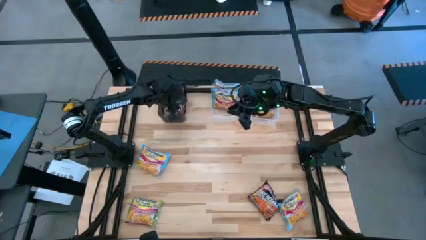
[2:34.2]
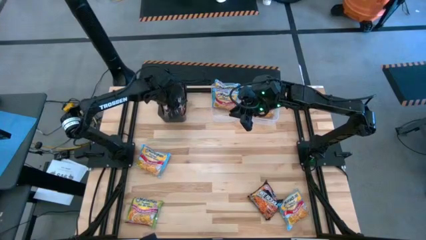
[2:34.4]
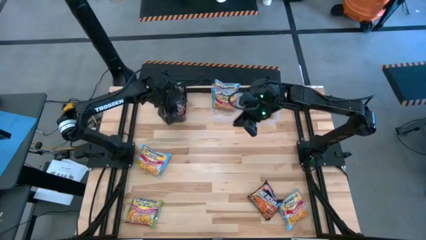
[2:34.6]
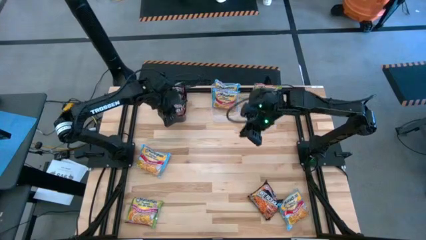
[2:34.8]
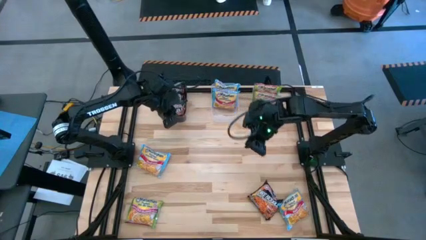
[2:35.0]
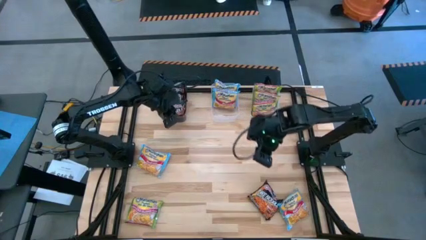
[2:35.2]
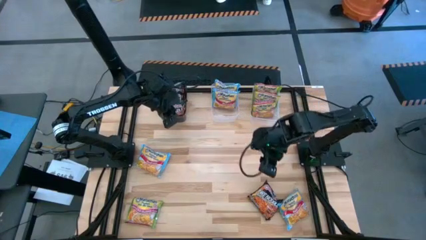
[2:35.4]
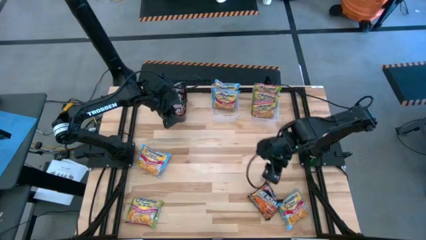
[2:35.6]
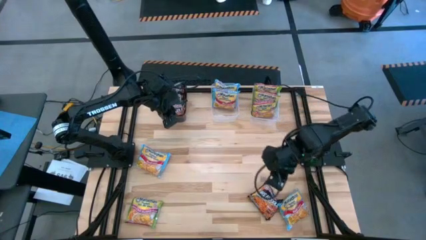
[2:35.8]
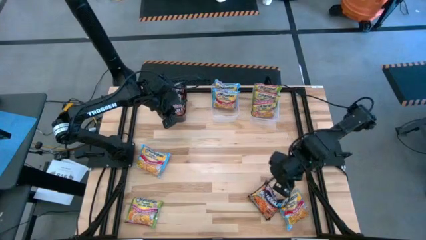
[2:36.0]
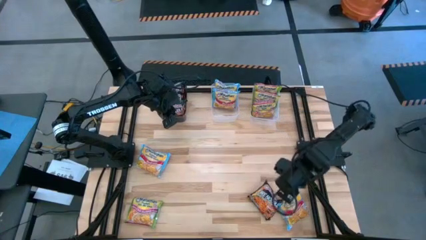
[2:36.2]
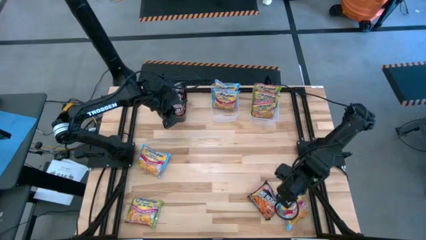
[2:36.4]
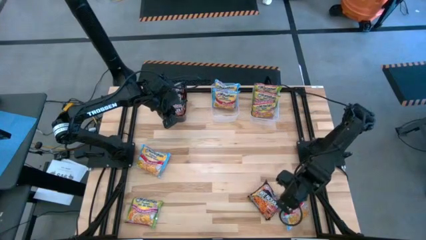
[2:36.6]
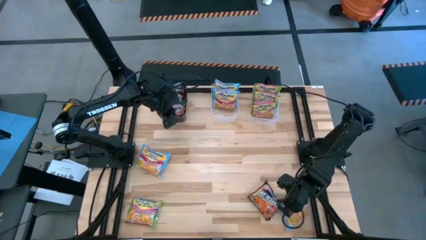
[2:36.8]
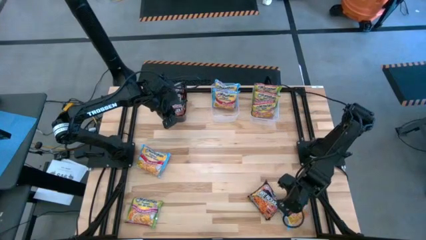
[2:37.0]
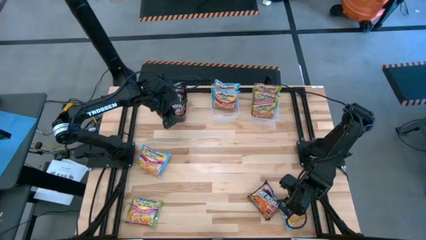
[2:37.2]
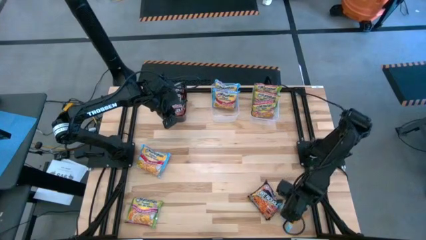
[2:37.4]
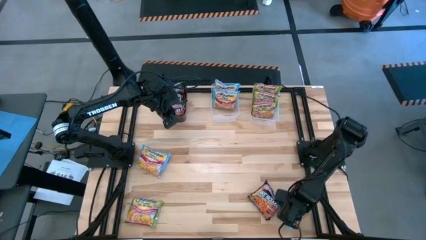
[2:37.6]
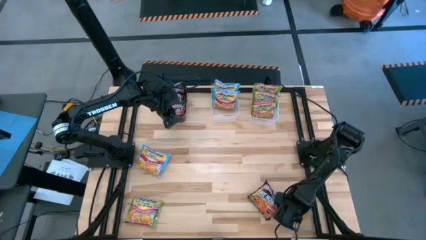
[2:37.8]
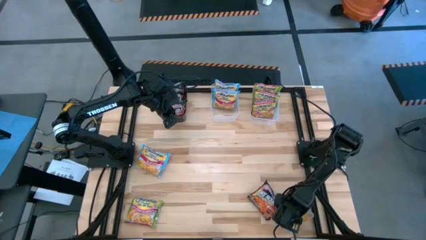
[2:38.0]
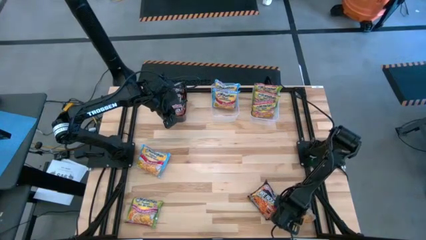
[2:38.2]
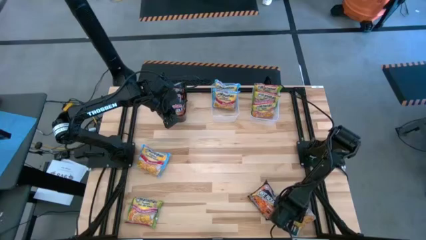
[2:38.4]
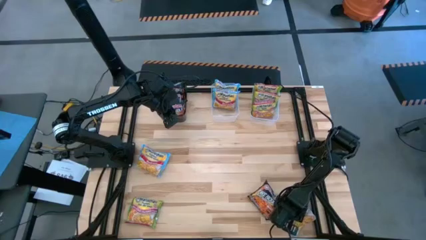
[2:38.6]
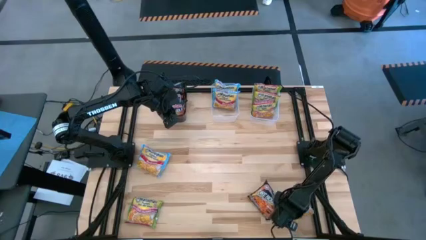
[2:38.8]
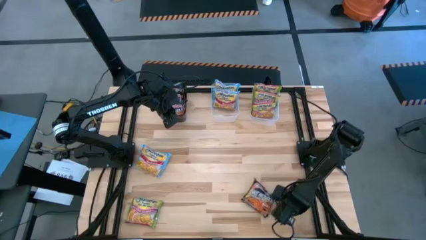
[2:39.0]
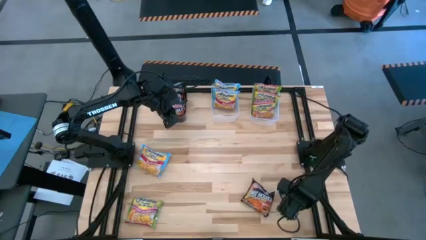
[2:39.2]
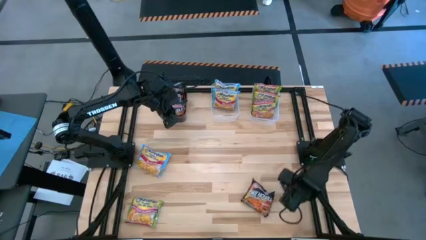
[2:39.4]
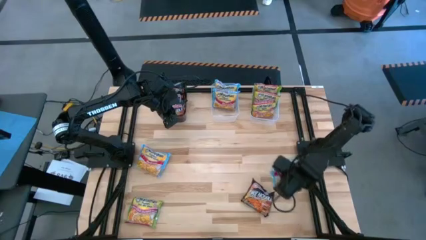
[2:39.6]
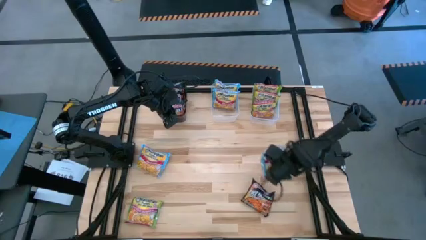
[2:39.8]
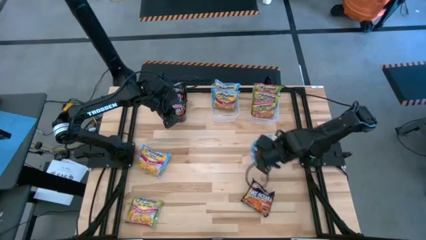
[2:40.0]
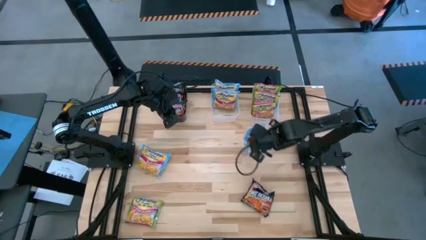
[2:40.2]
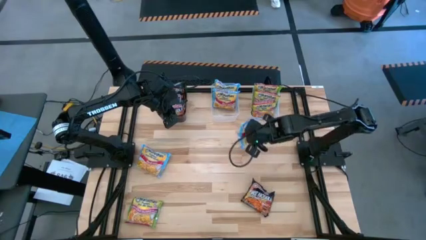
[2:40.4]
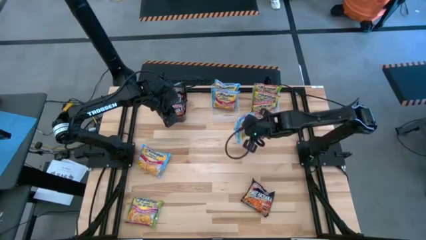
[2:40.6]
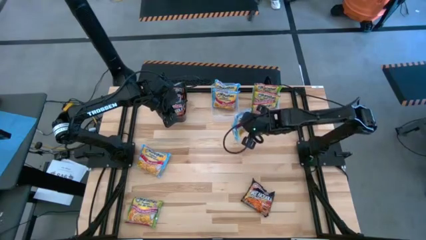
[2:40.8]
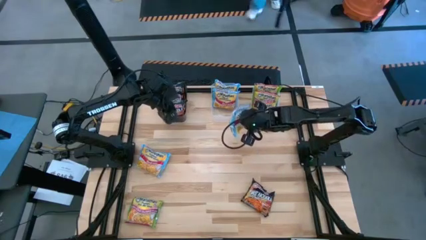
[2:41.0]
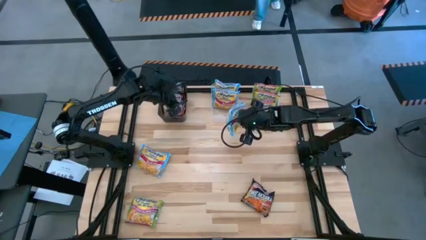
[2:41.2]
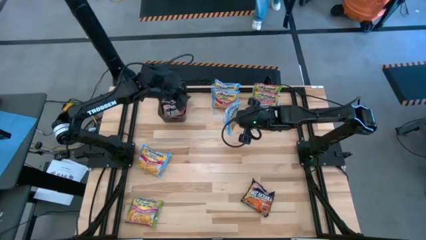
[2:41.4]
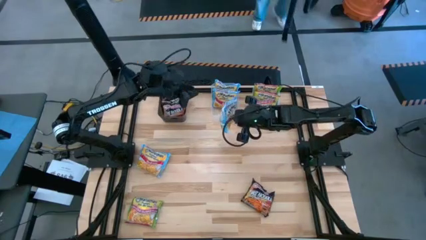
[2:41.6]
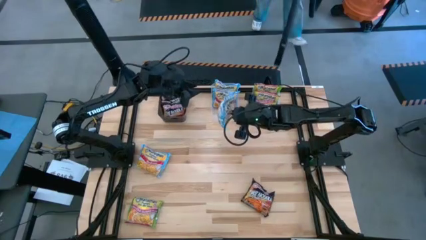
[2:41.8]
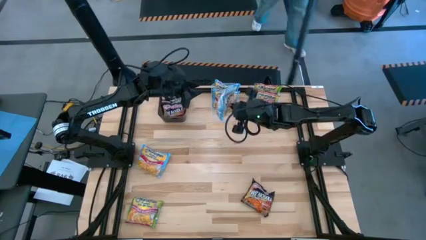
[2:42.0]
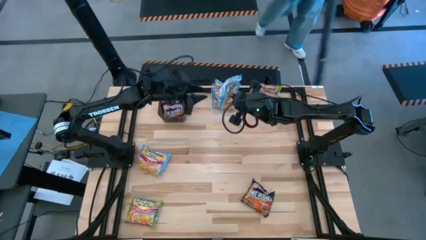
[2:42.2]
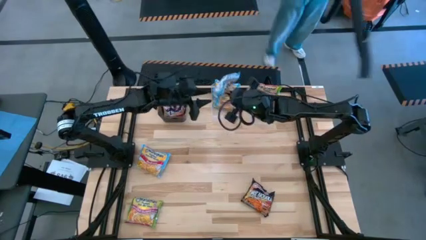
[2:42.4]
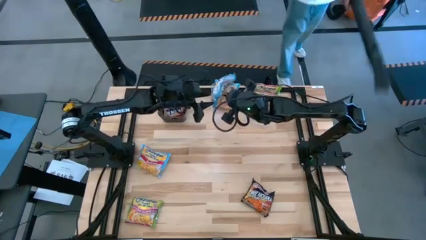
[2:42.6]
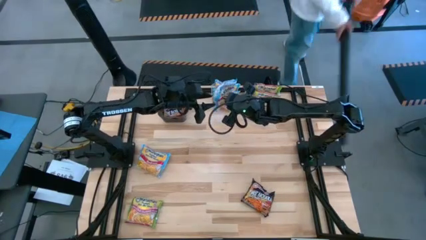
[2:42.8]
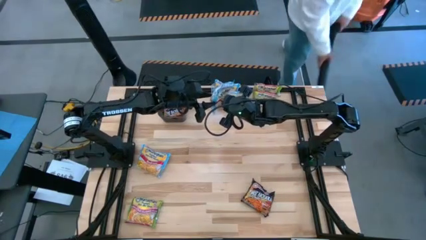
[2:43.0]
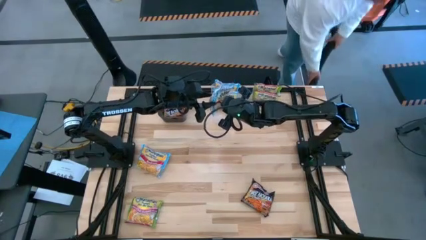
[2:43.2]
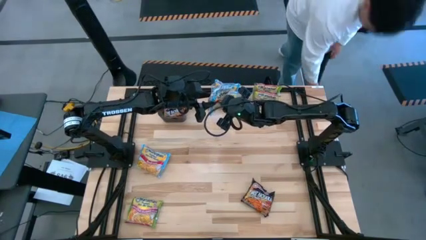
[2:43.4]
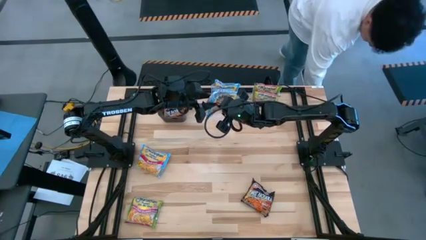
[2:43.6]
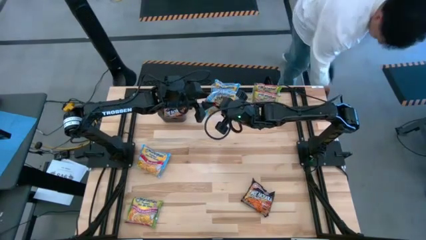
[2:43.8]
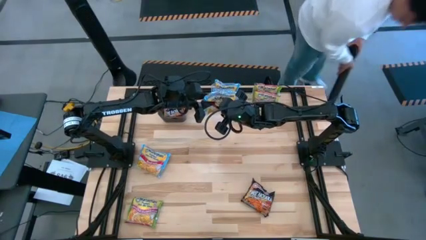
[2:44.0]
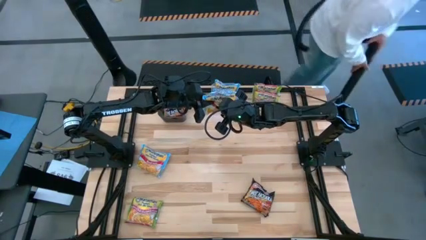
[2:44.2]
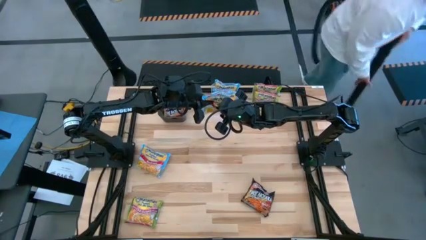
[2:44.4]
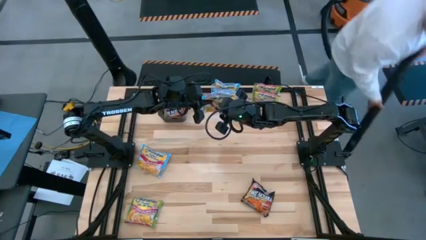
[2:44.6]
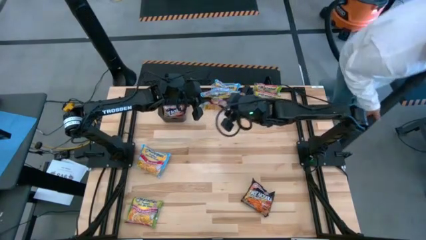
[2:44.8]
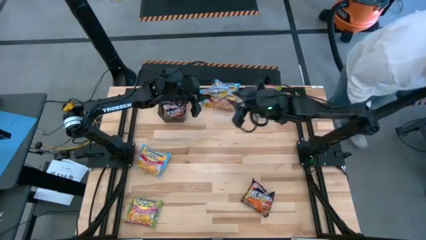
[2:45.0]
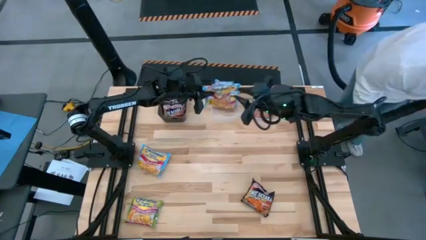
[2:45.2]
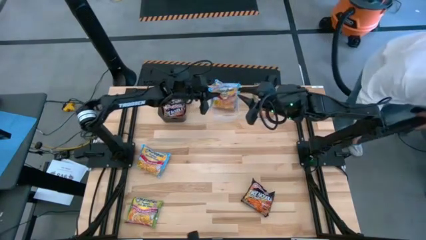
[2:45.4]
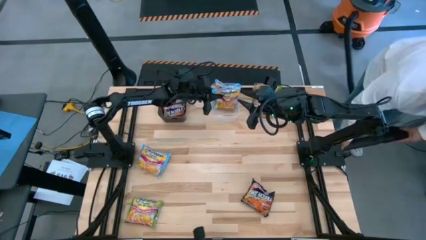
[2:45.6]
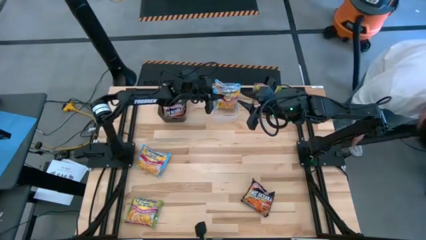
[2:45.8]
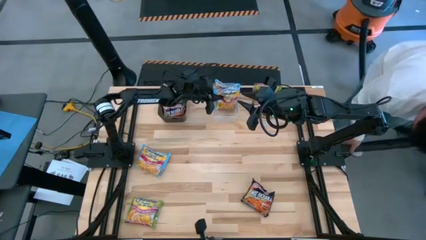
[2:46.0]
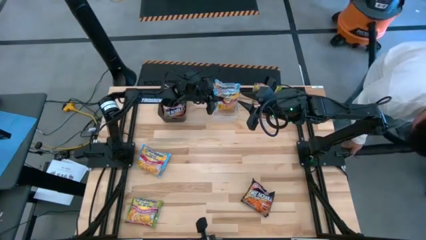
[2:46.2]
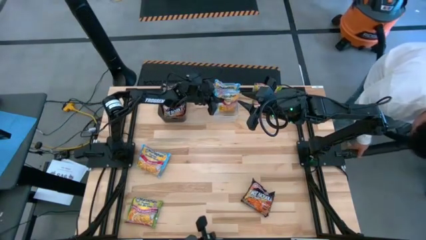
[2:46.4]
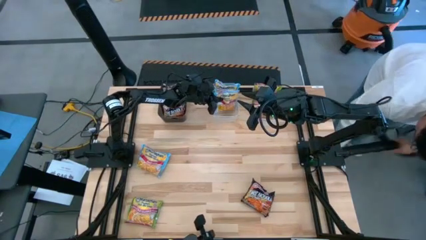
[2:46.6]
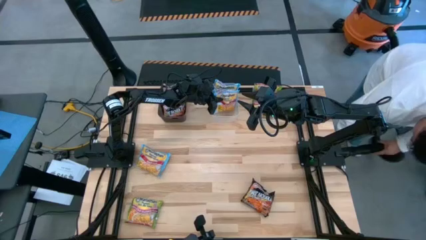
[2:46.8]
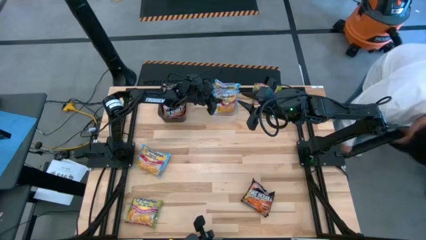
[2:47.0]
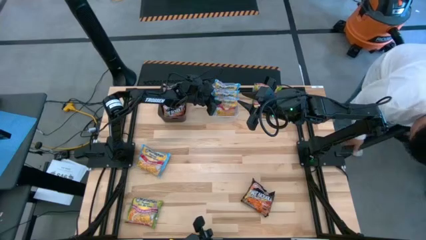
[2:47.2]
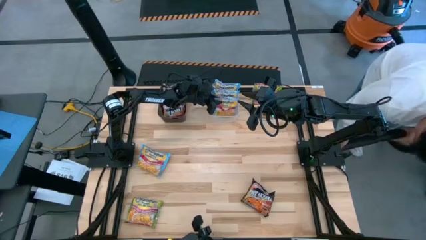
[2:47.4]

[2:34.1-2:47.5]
Task: Sort Maruchan noodles
Put the right blue noodle pack into the left transparent bin

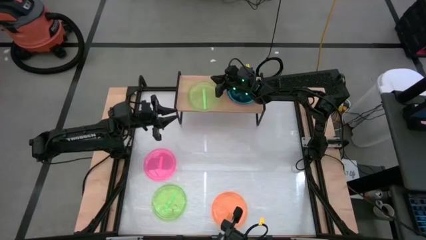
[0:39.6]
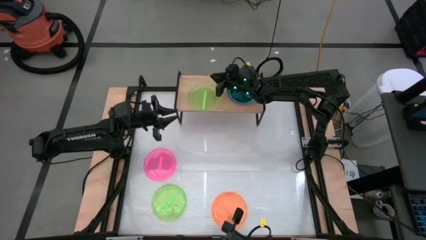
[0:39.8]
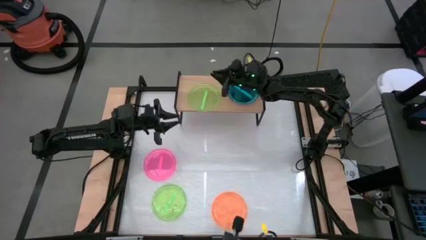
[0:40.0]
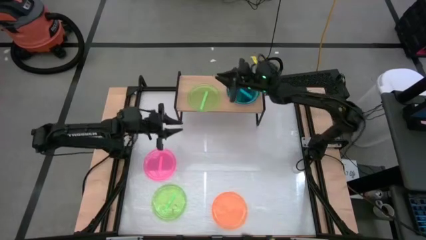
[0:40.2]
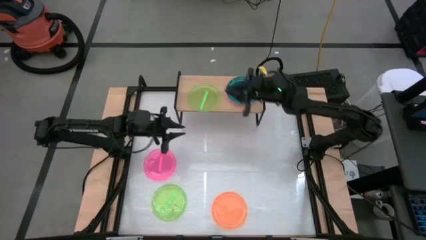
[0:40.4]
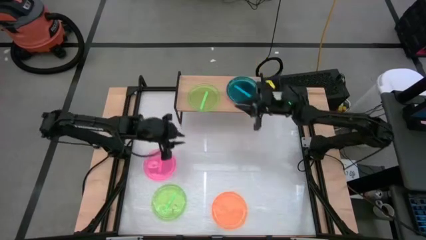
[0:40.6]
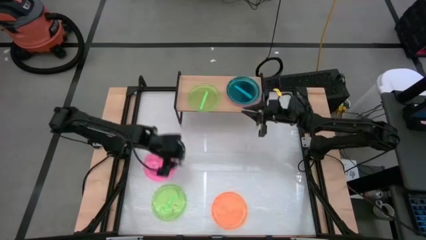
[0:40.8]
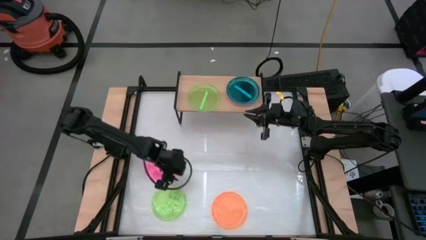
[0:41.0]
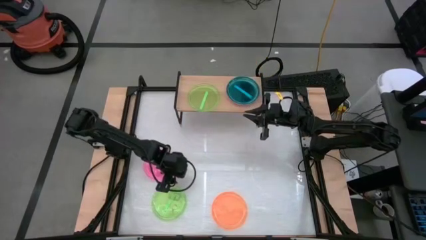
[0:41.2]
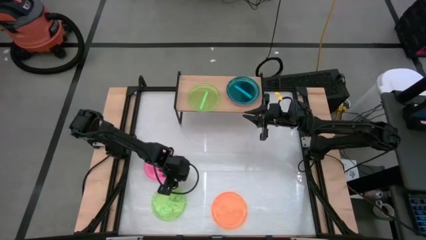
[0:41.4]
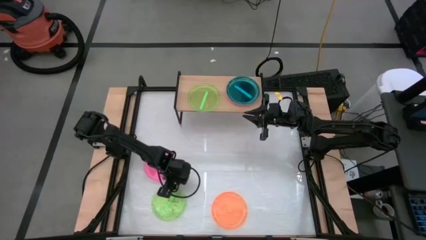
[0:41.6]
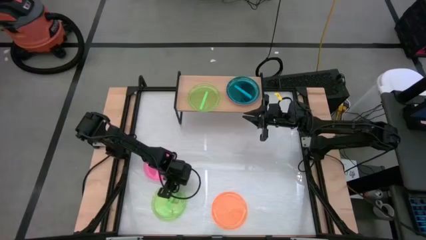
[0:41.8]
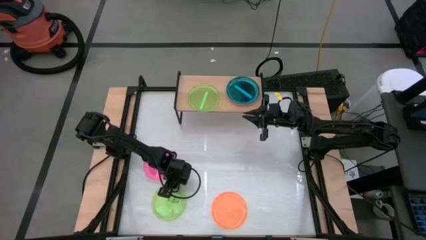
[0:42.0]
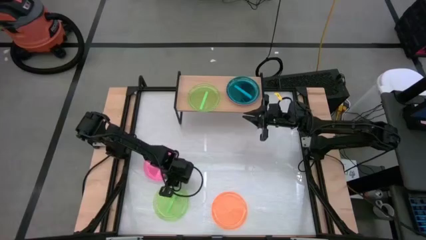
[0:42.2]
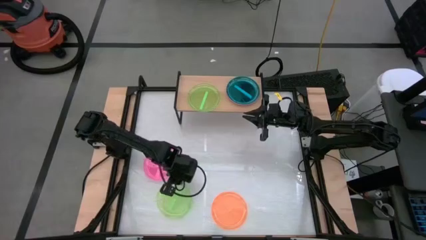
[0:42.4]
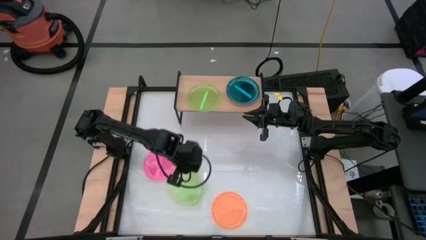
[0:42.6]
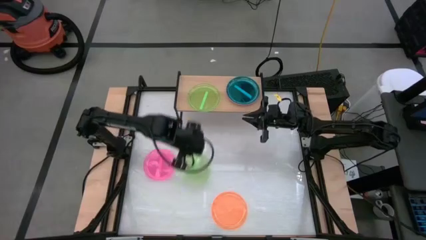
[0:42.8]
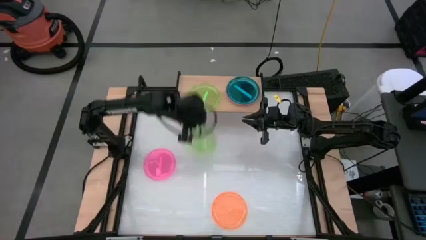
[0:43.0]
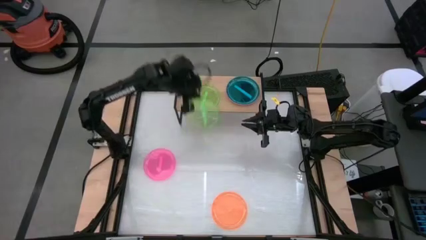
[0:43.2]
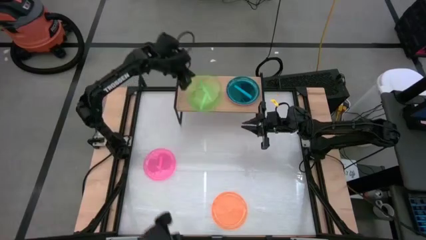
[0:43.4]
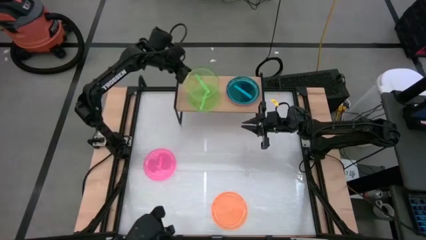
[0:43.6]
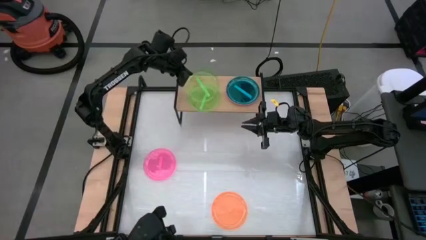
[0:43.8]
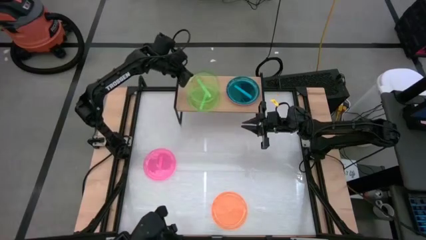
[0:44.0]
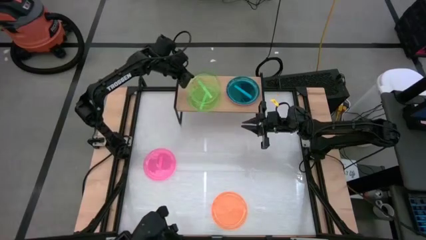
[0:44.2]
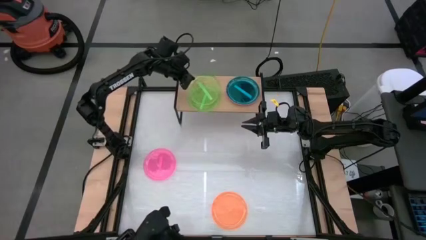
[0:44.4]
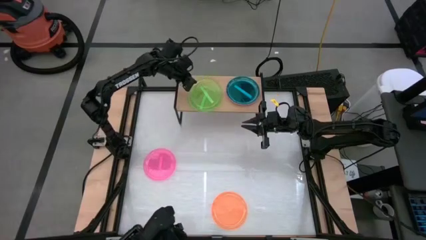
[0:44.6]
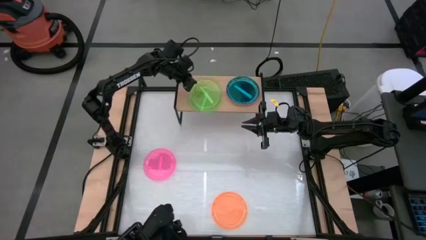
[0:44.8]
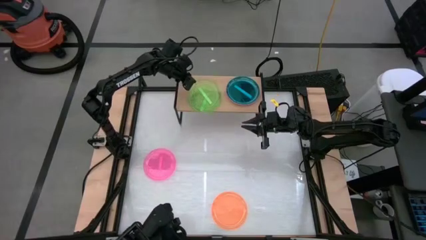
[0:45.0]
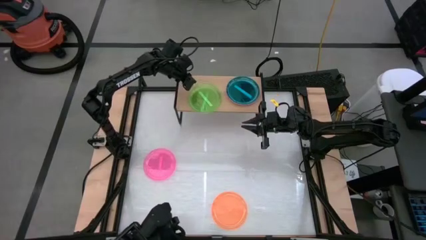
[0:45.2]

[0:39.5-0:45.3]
Task: Place and stack plates onto a shelf
Stack the green plate on top of the green plate on the shelf
